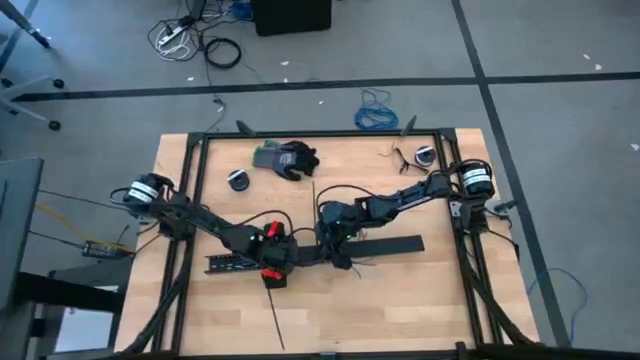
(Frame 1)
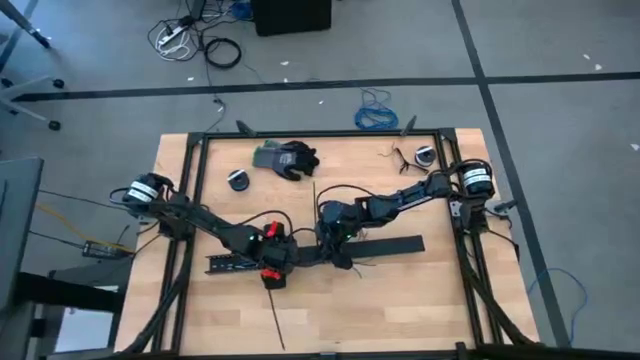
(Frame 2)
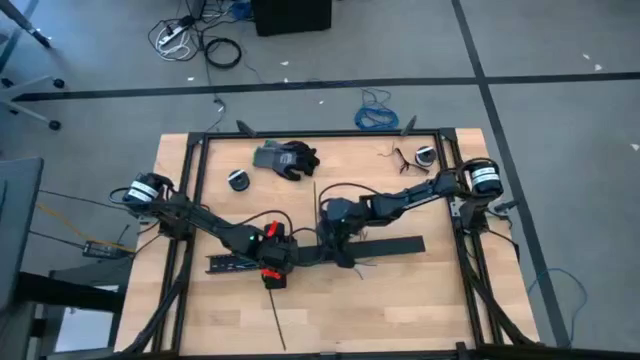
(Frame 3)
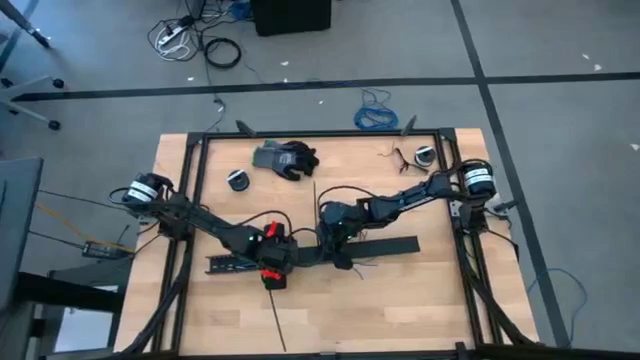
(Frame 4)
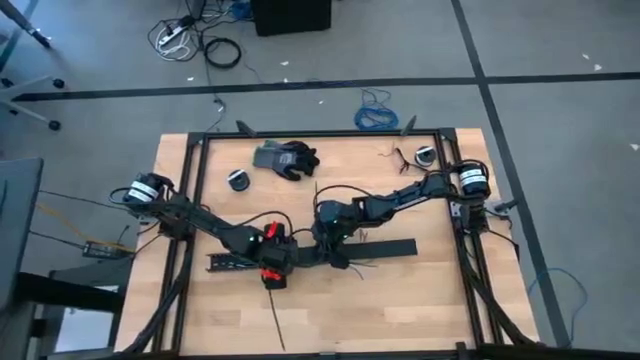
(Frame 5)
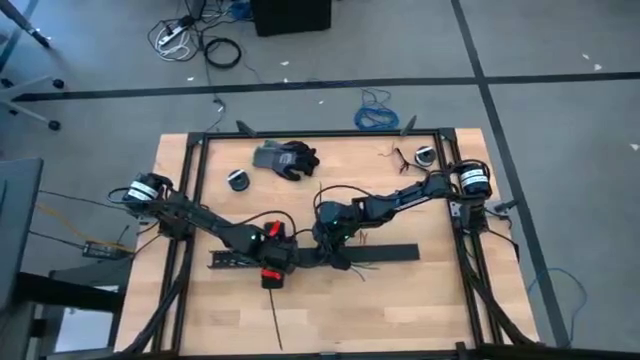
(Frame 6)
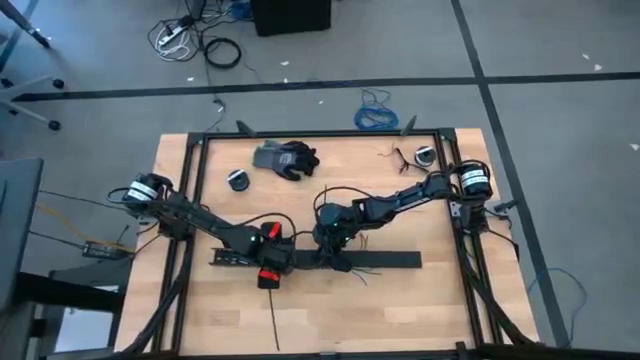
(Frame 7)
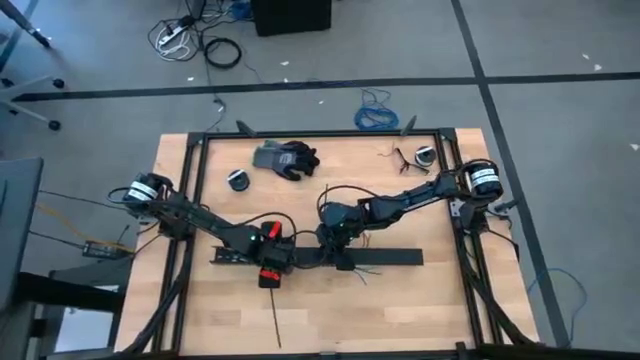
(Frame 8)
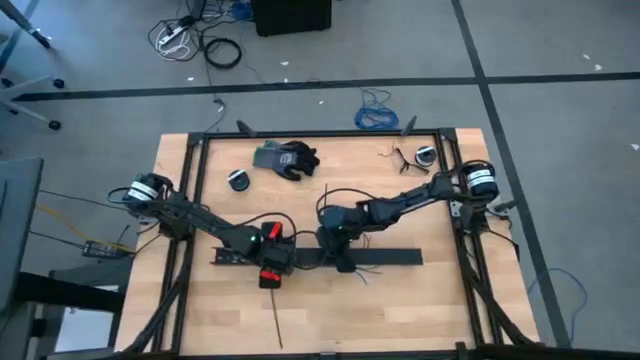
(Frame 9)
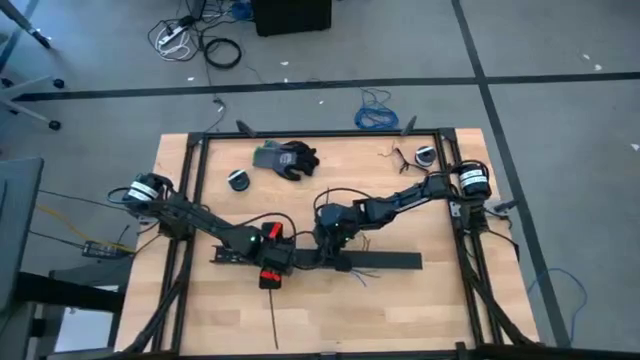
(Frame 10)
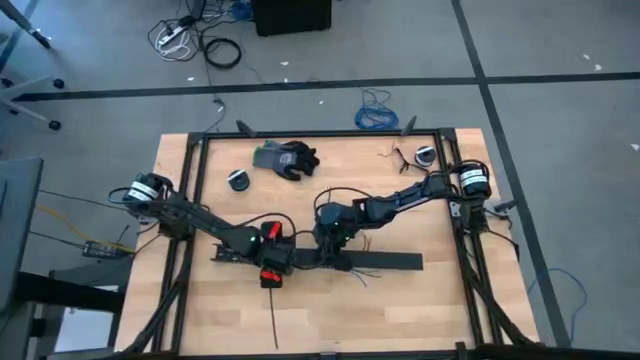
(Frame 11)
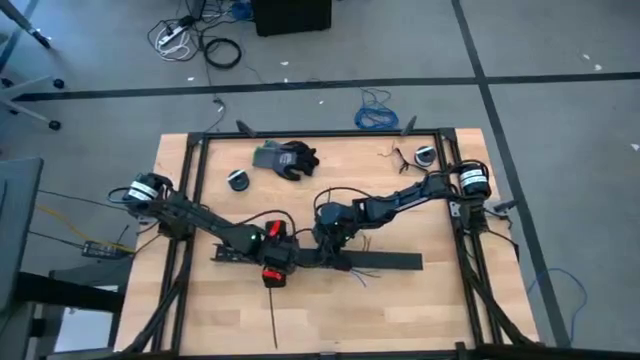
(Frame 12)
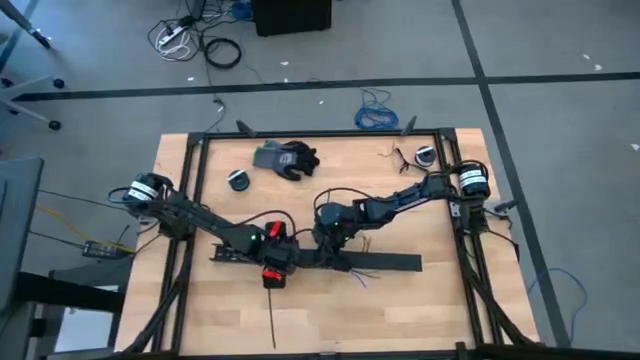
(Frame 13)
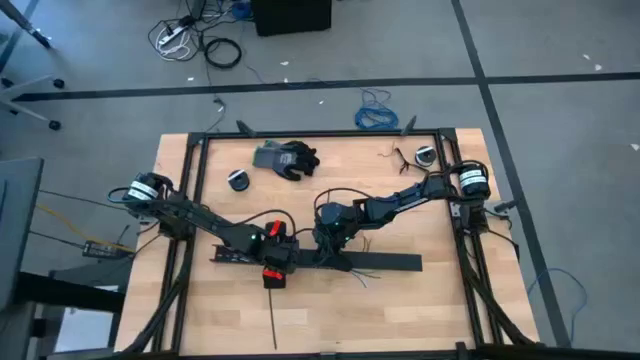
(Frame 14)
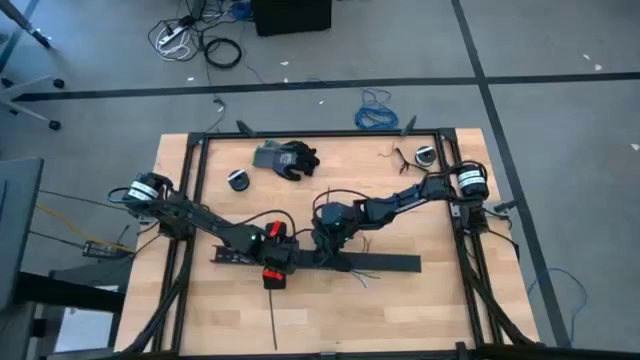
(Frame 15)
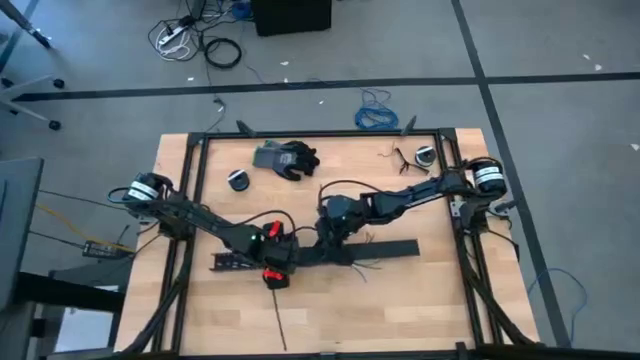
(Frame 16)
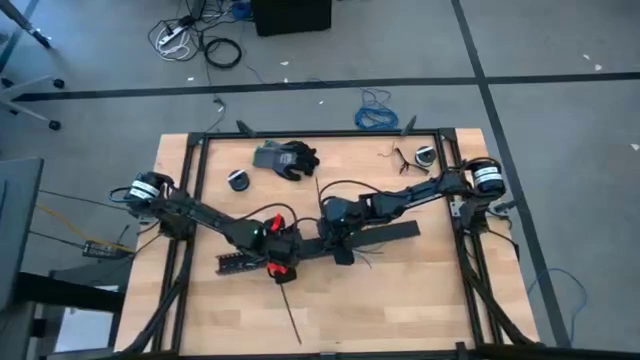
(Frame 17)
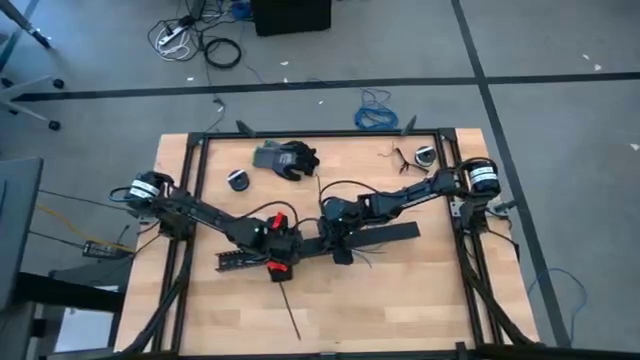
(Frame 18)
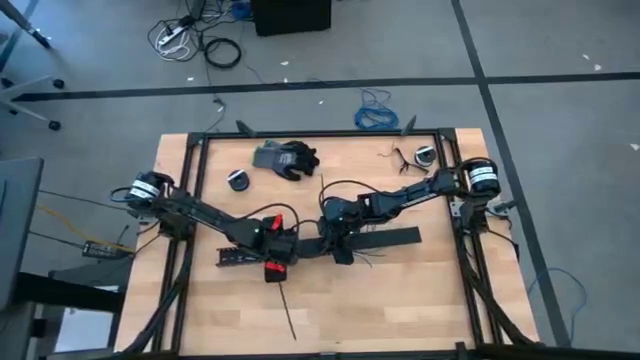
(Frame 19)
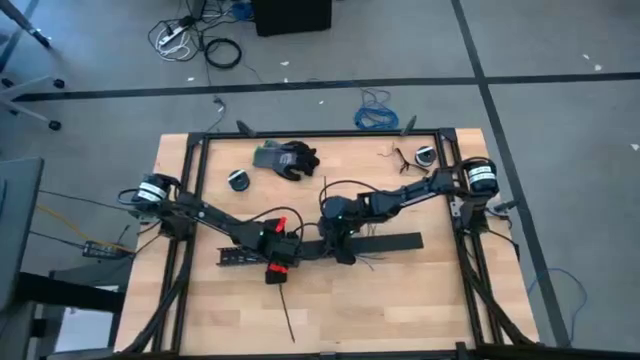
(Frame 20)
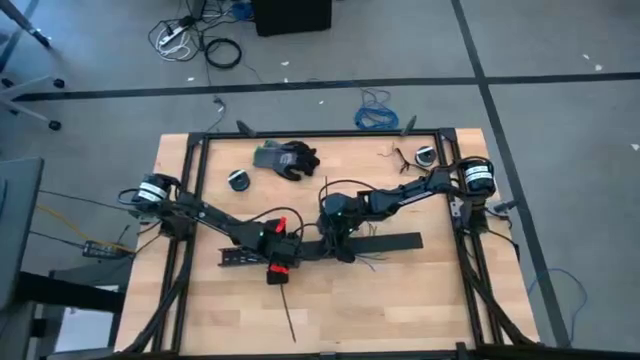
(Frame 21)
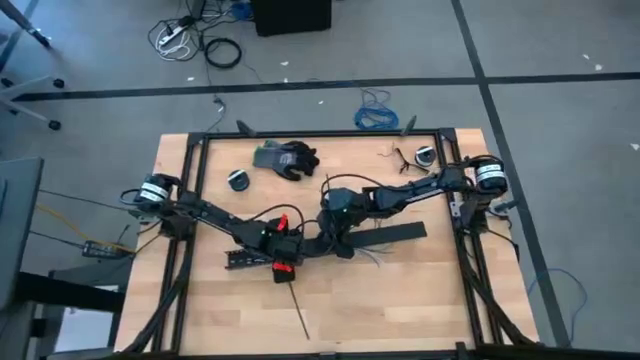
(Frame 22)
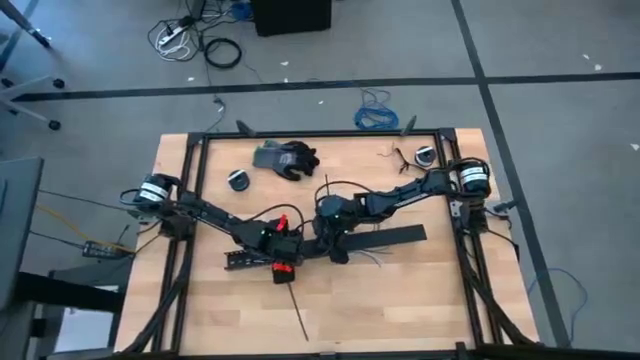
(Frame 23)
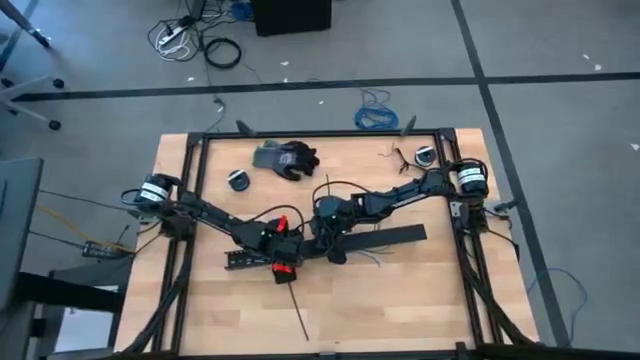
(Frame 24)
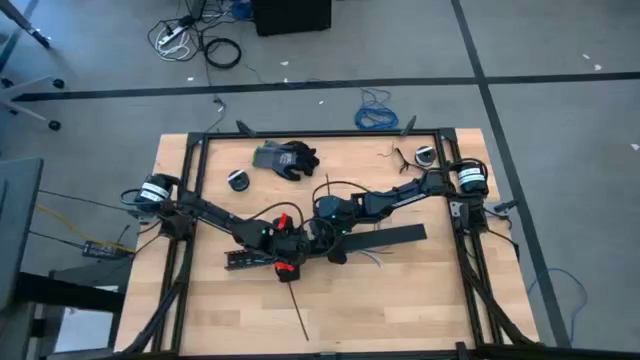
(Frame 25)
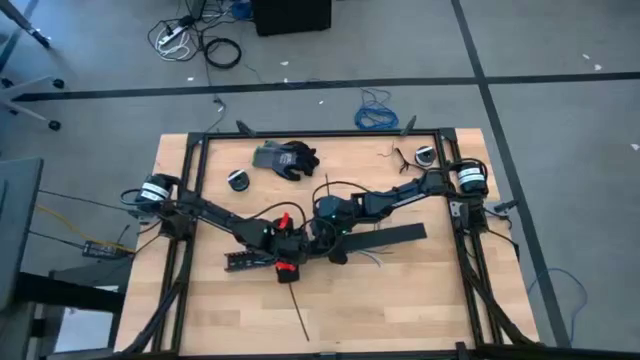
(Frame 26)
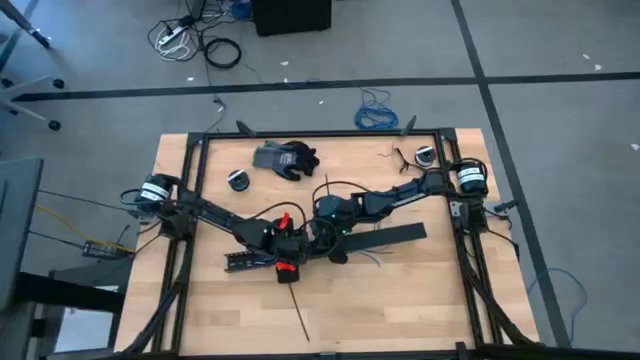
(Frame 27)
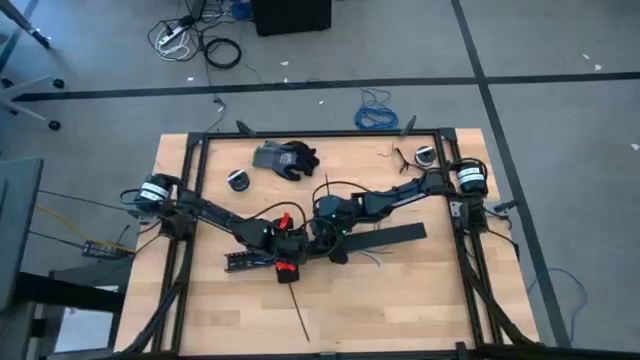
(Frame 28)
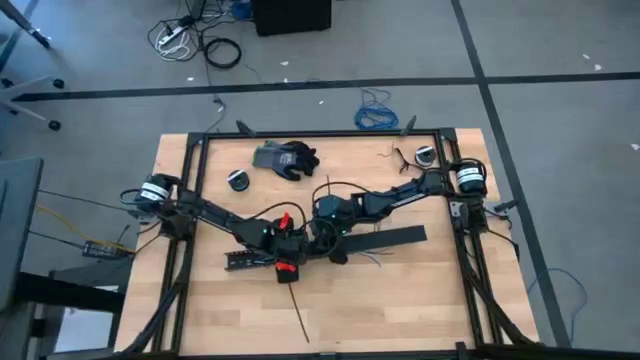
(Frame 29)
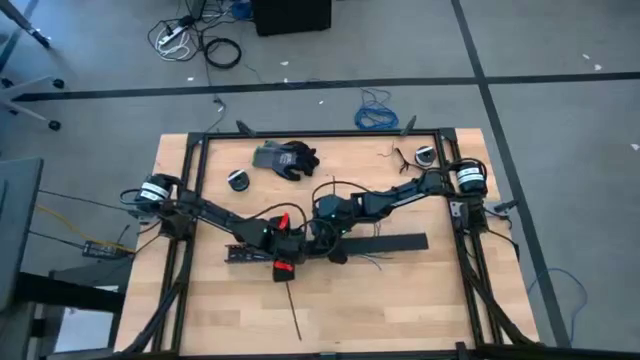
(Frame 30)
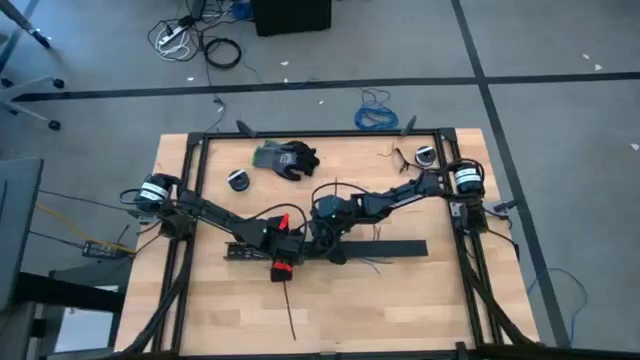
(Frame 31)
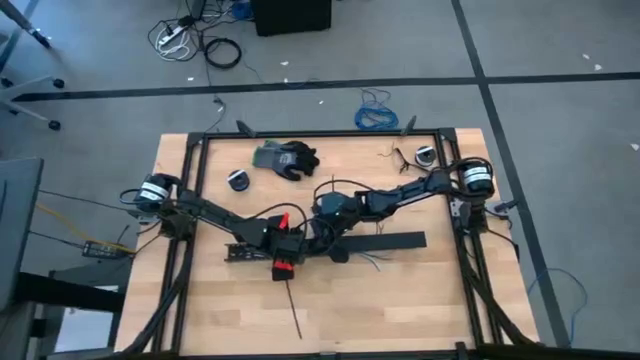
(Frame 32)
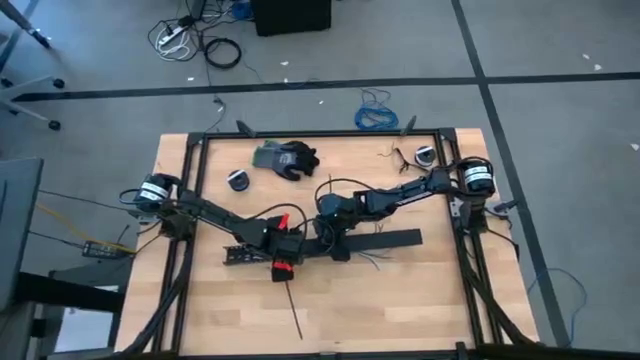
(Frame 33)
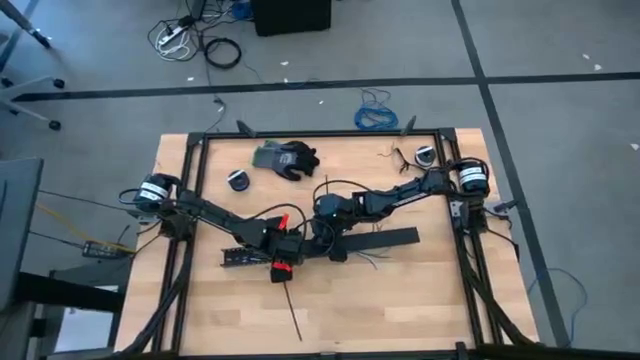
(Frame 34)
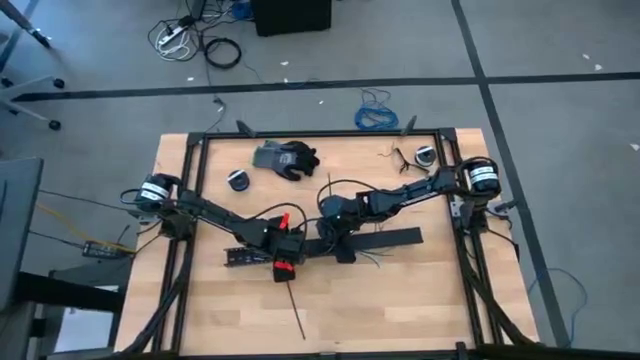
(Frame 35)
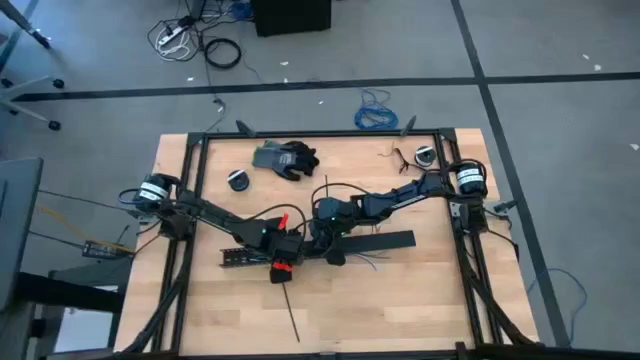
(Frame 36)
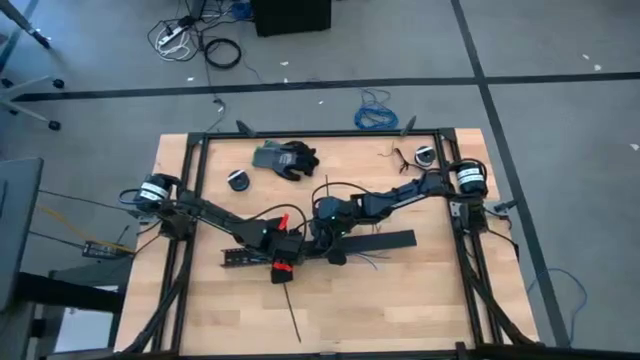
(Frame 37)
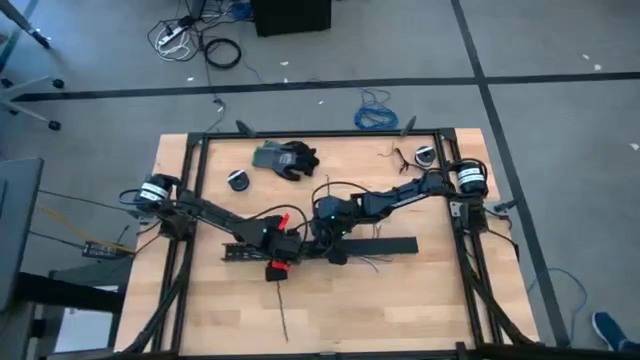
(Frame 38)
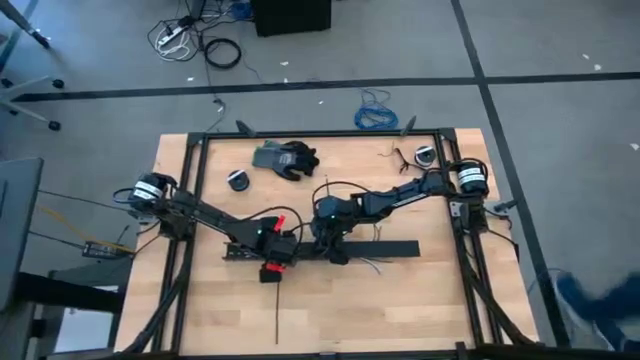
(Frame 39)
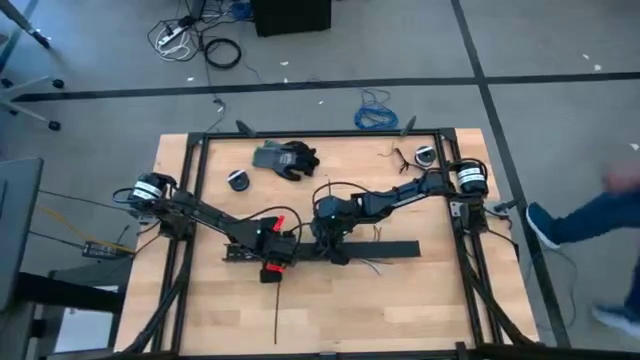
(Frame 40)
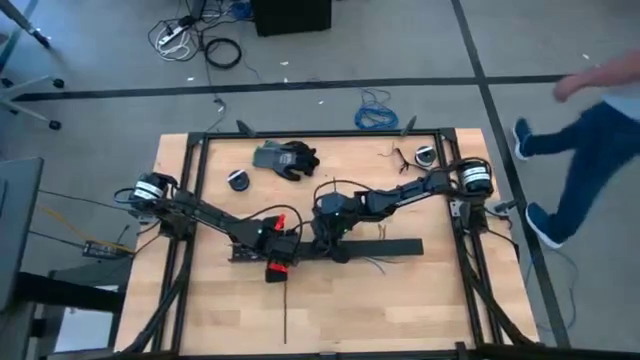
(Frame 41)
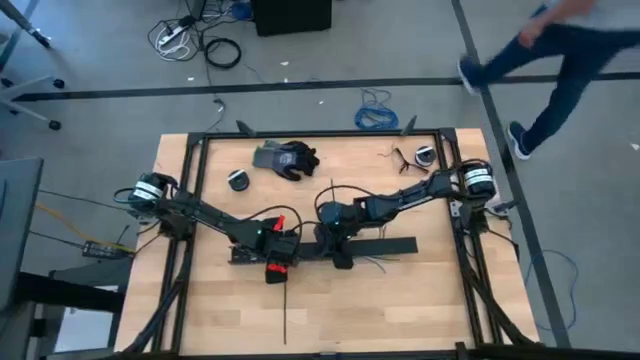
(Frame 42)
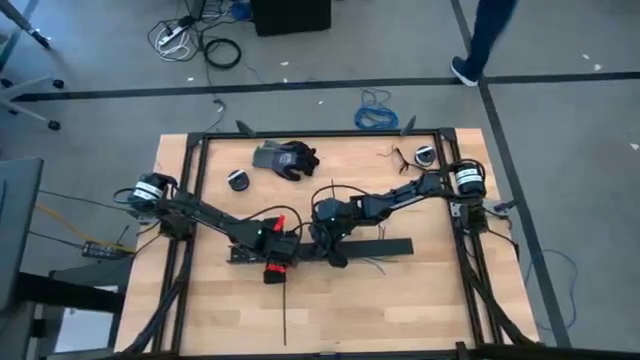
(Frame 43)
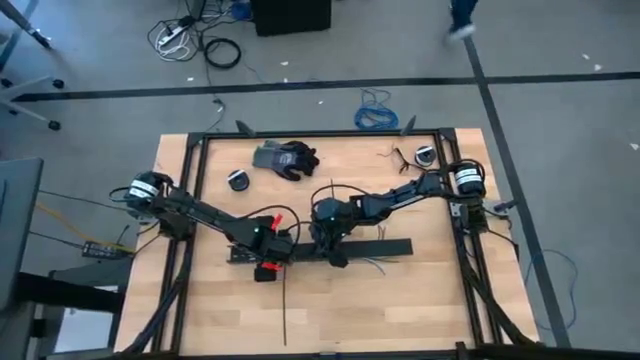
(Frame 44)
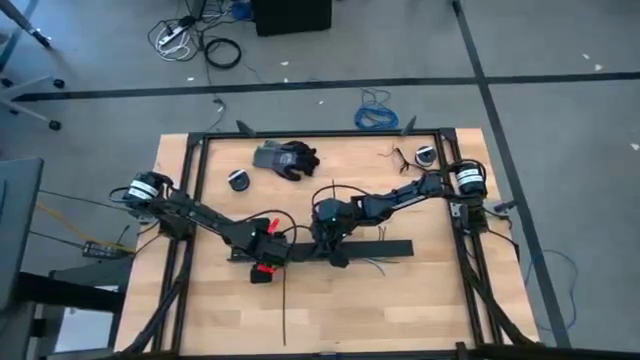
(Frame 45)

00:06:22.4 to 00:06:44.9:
Task: Ziptie cables
Close the black cable duct
